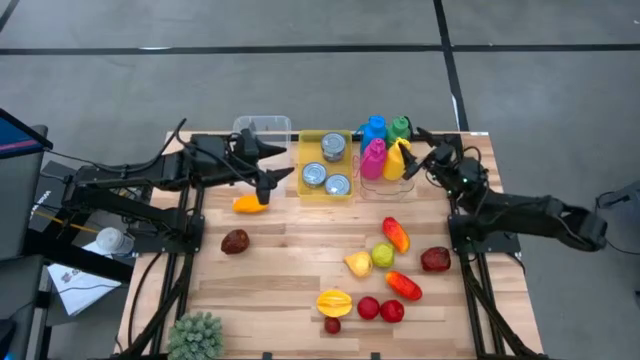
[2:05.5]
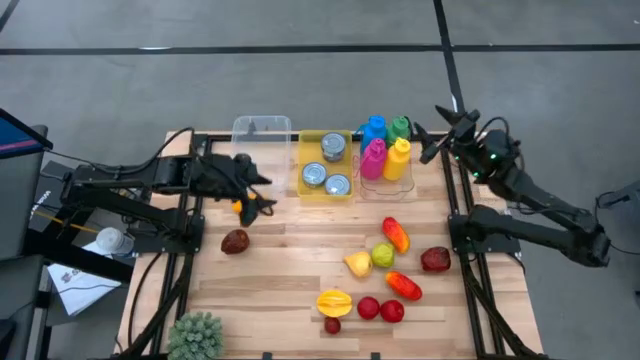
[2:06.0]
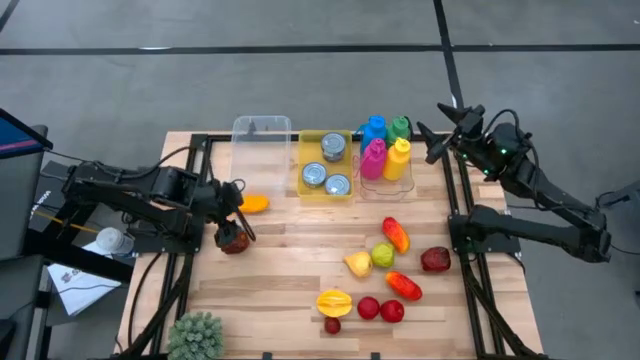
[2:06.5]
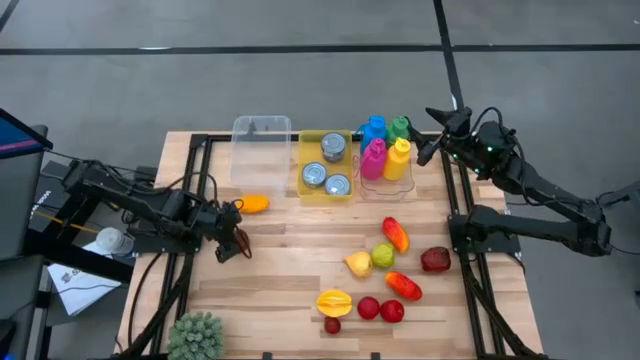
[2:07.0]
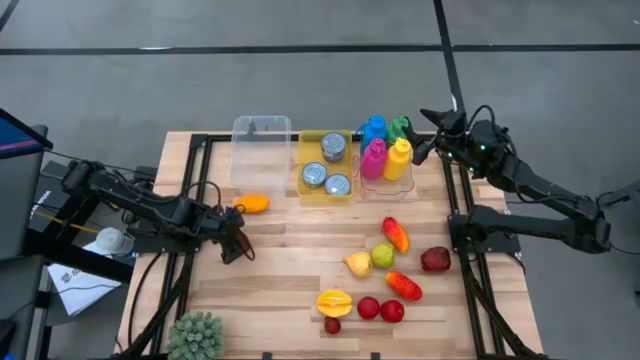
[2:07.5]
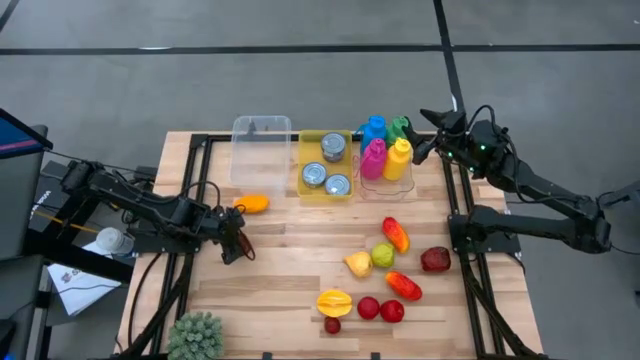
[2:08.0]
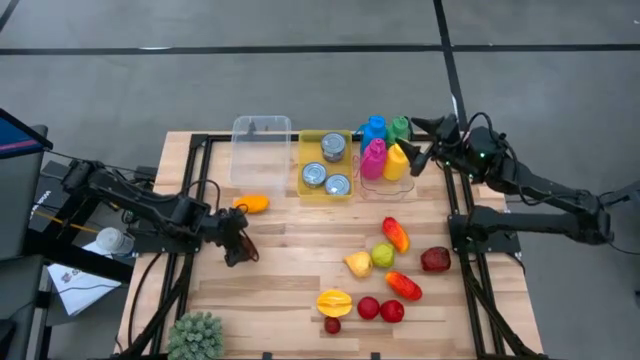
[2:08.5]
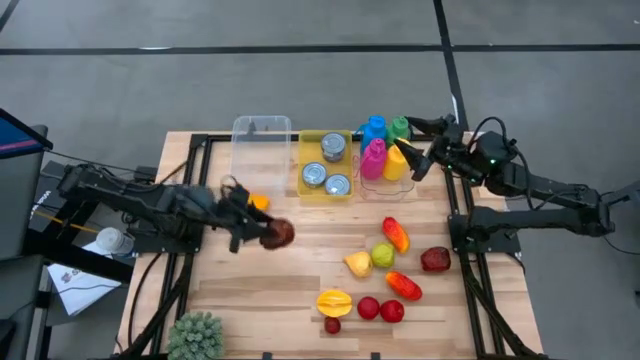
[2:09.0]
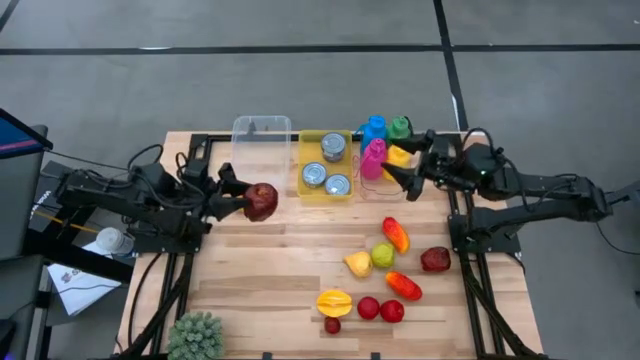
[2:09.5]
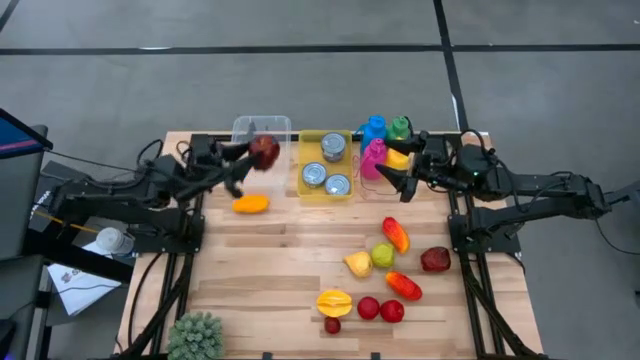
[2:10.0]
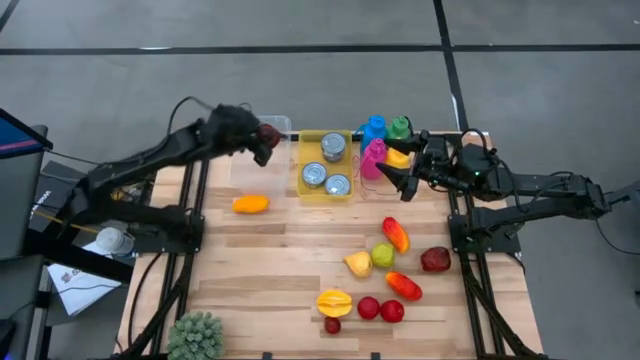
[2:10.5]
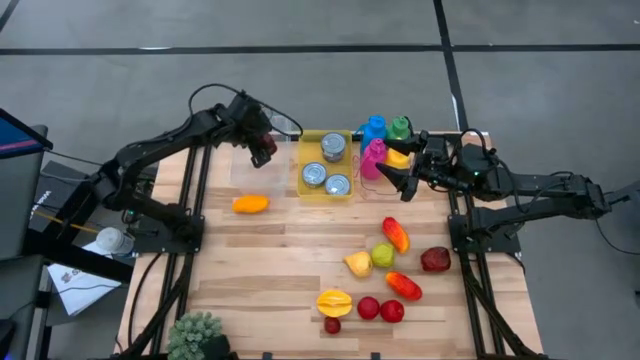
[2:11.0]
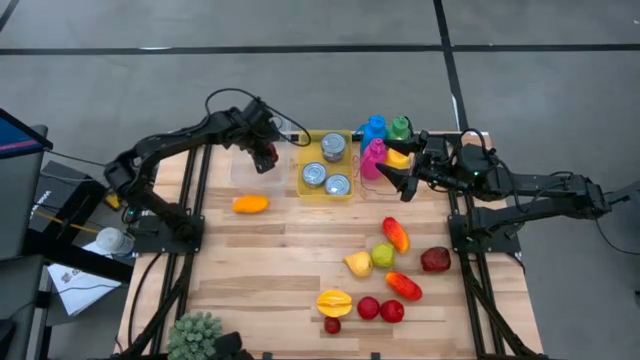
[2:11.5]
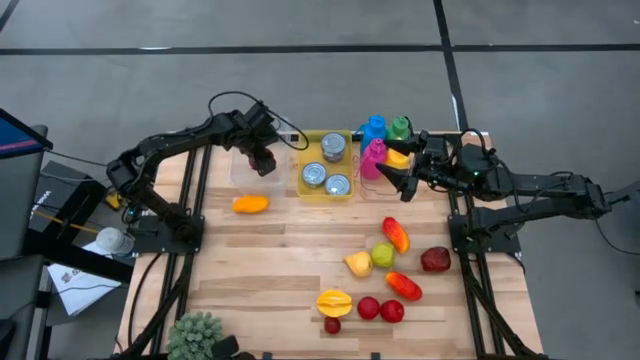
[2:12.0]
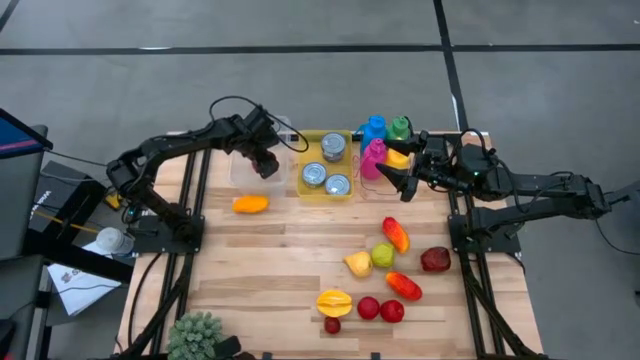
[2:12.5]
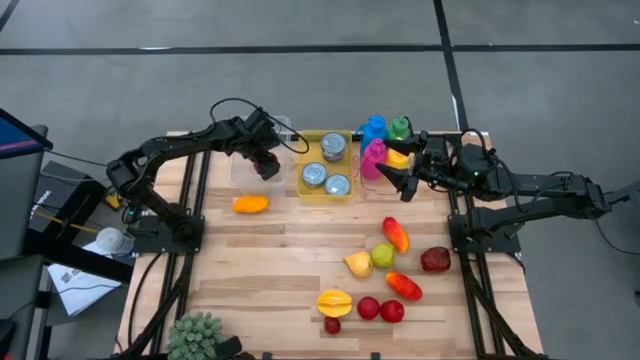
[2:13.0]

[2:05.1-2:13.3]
Task: Pick & Place Food Item
Put the left red apple into the transparent container

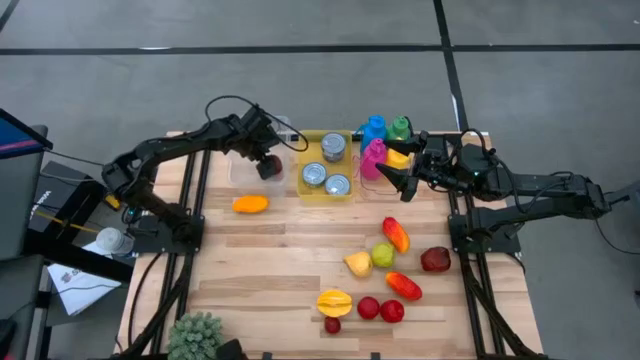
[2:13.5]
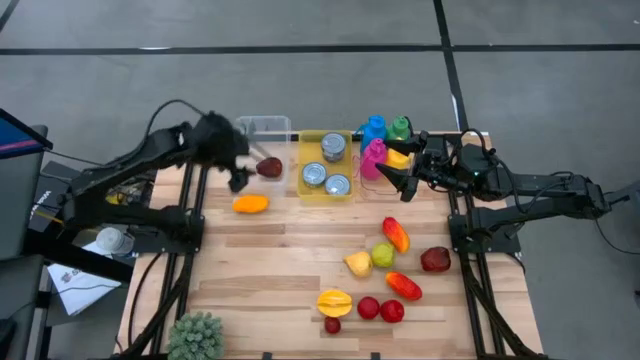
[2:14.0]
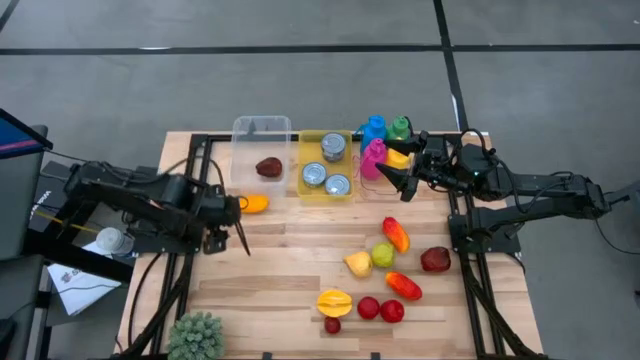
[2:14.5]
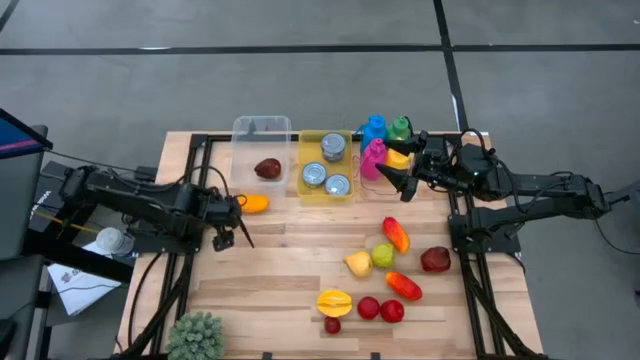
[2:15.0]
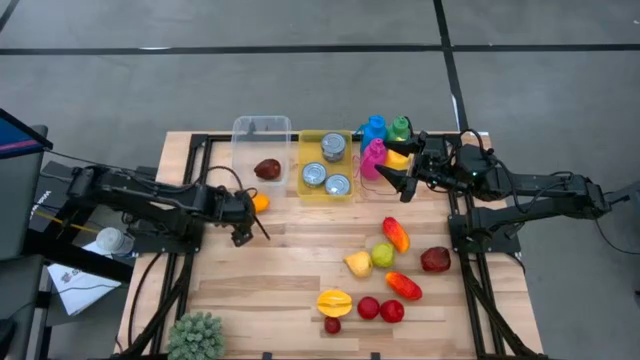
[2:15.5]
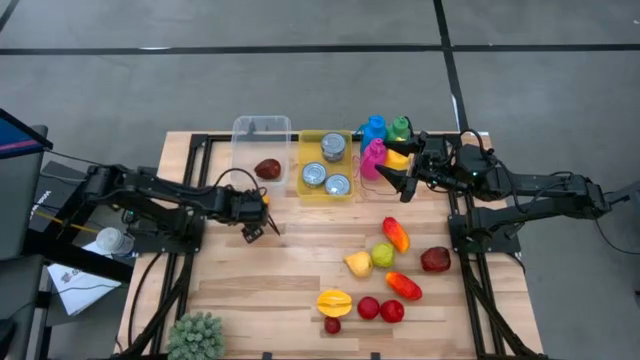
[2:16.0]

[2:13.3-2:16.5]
Put the yellow mango into the transparent container

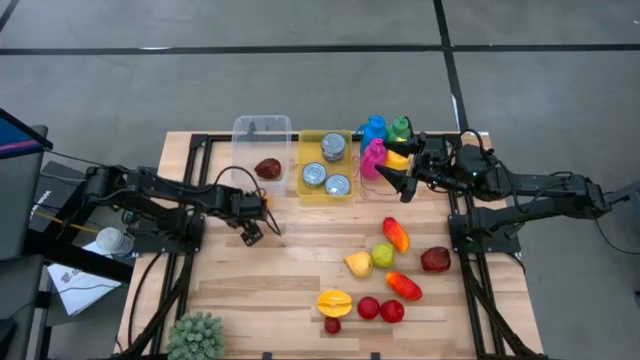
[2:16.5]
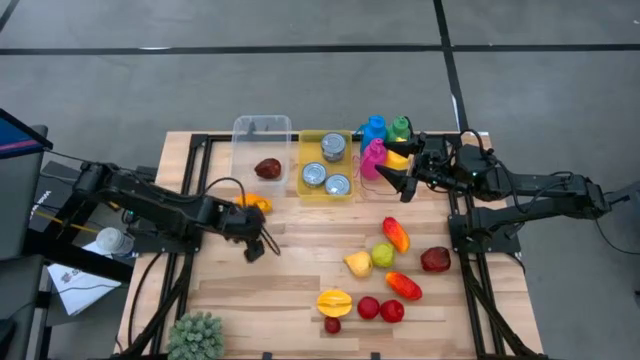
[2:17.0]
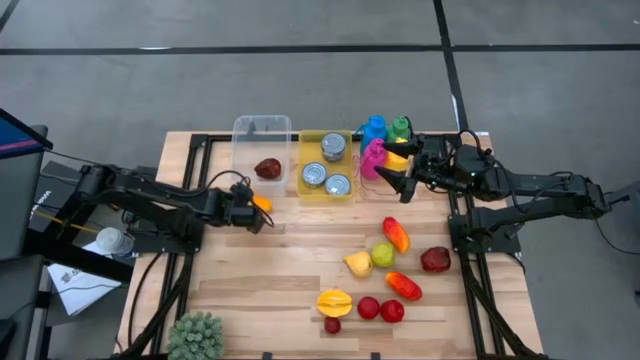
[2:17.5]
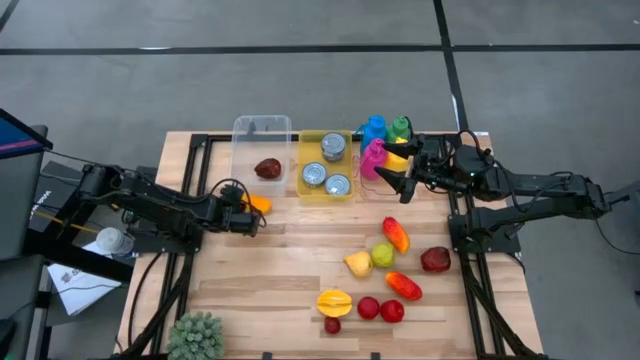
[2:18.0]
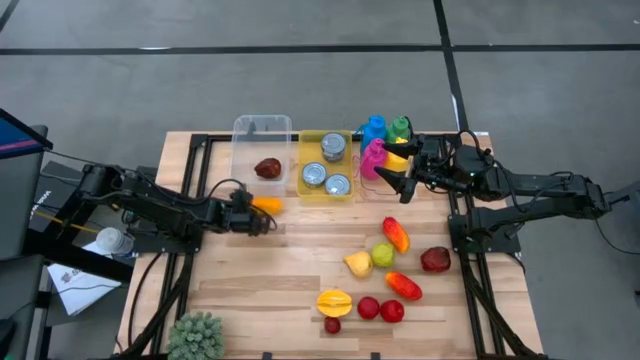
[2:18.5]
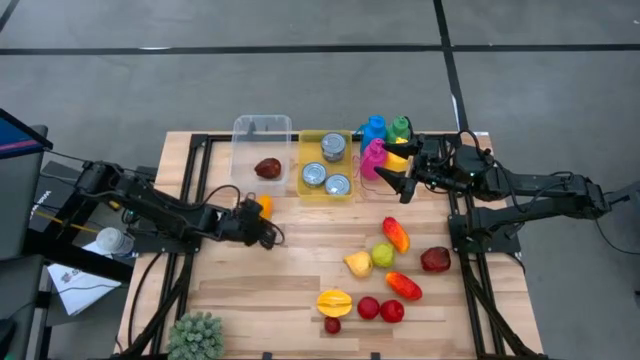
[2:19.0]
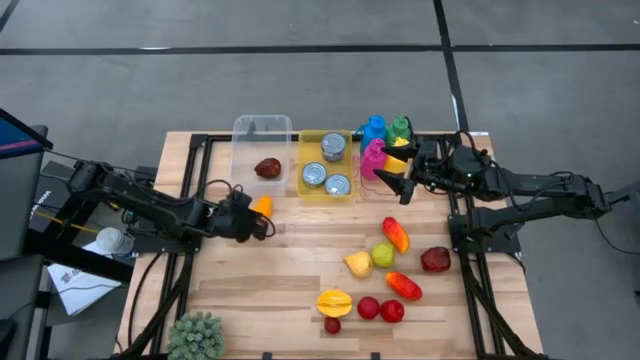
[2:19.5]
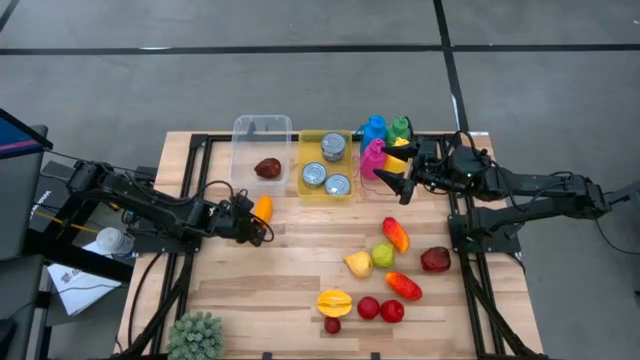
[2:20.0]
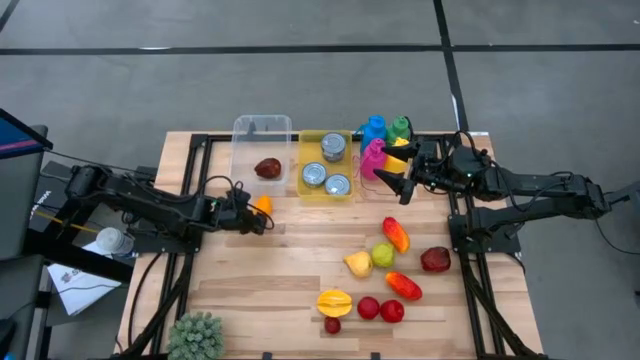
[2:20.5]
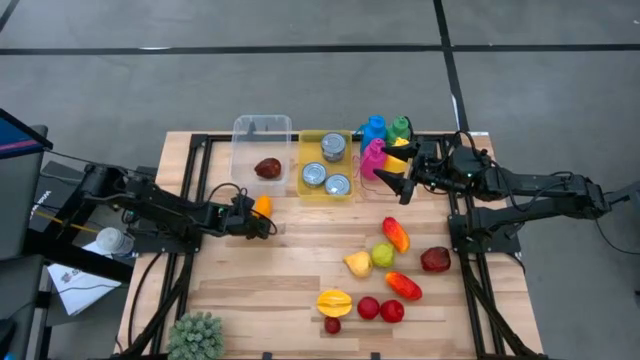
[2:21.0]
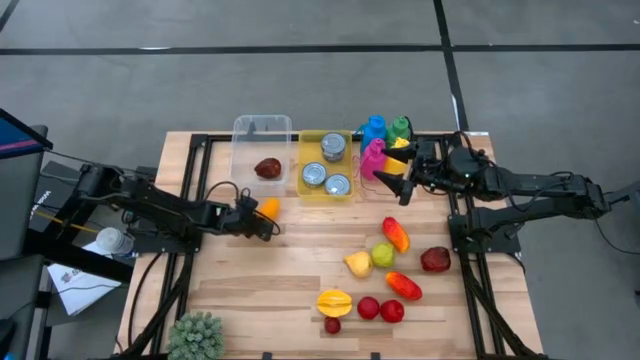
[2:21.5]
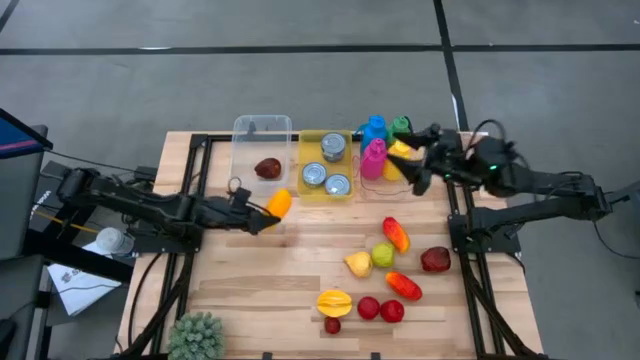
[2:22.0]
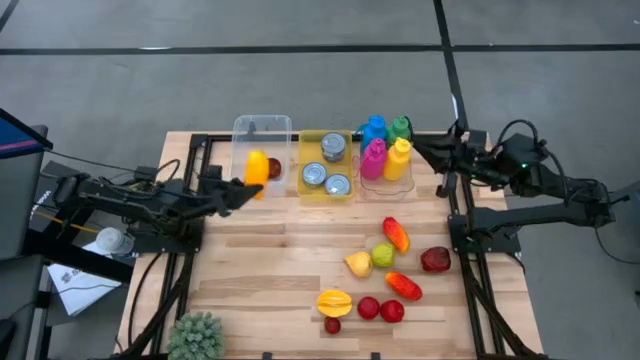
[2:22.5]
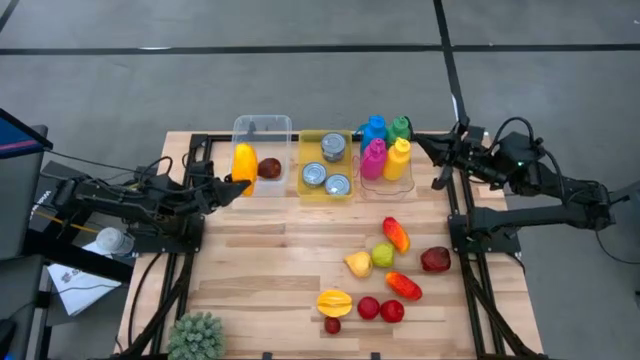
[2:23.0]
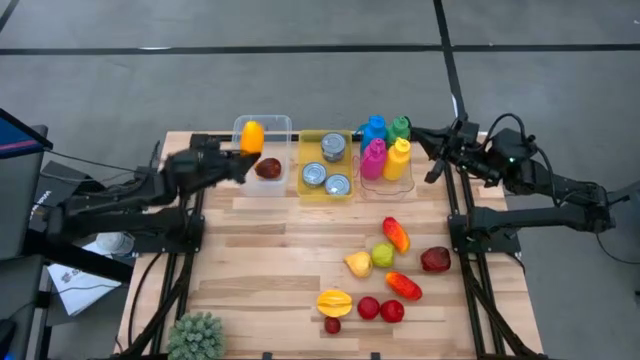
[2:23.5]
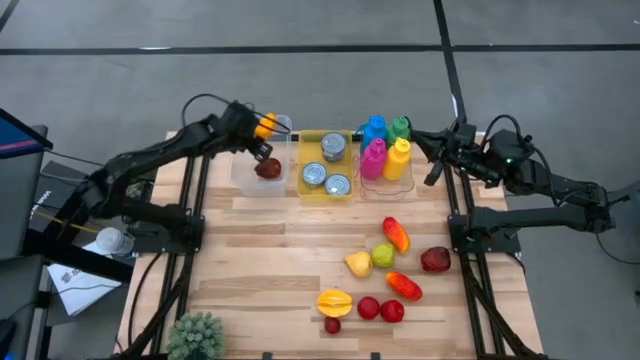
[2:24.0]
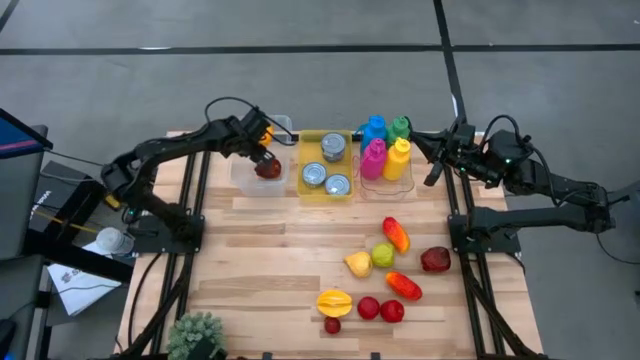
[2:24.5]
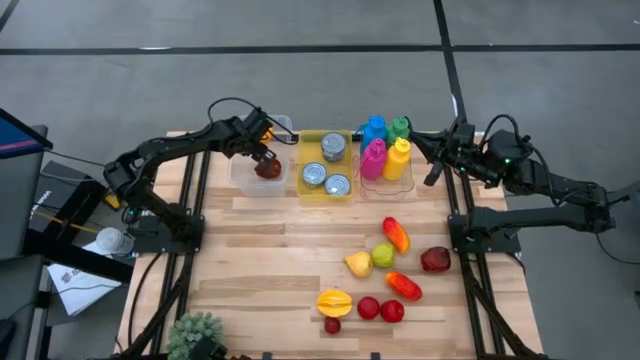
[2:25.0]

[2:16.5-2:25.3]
Put the yellow mango into the transparent container

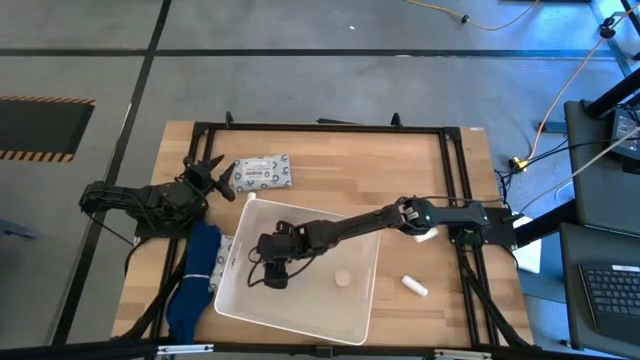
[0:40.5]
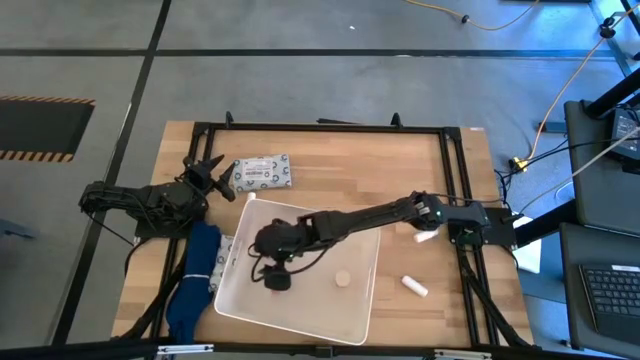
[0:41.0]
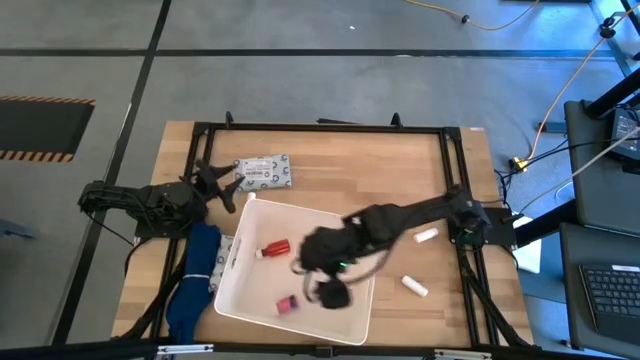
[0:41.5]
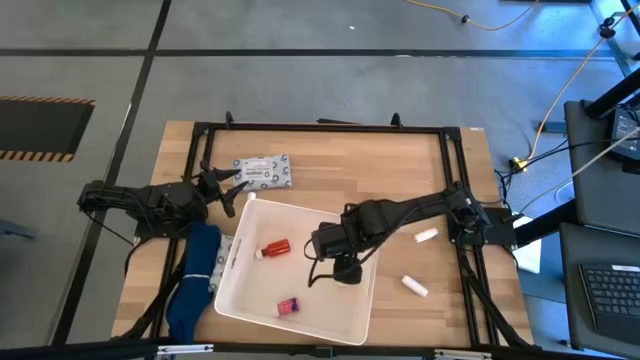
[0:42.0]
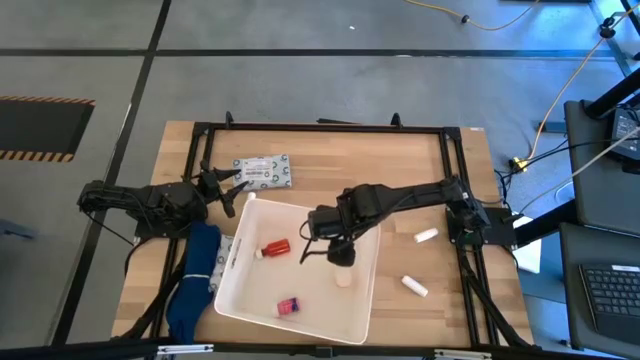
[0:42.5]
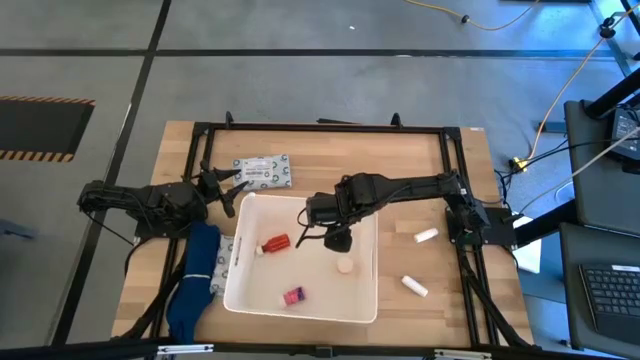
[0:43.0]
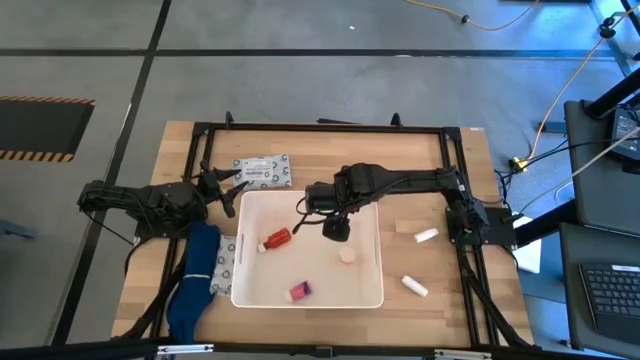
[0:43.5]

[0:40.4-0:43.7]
Task: Pick & place medical supplies in basket/bin
Adjust the white bin
